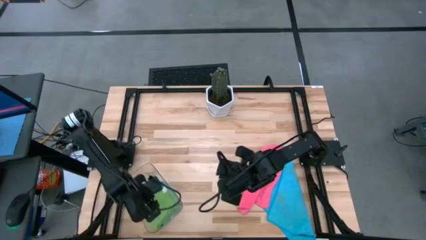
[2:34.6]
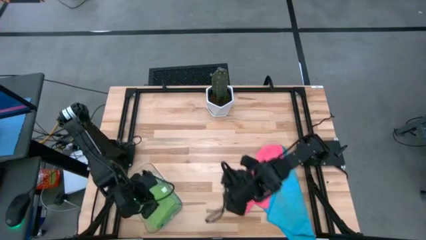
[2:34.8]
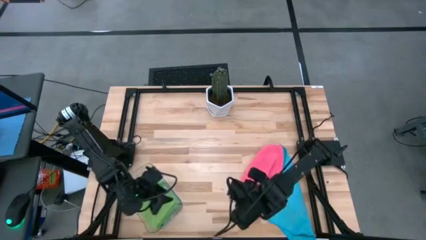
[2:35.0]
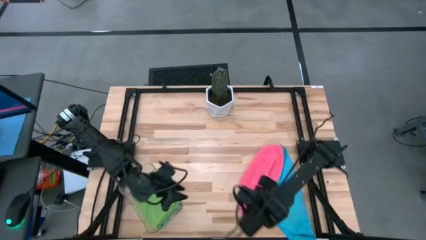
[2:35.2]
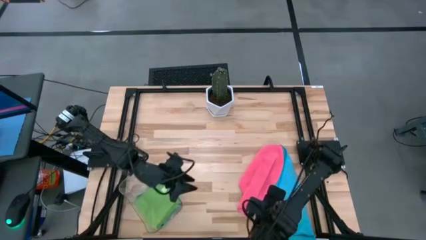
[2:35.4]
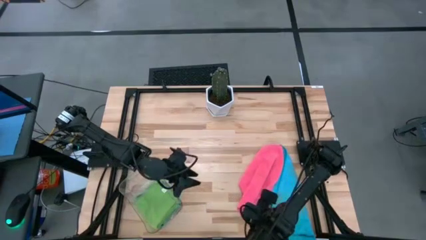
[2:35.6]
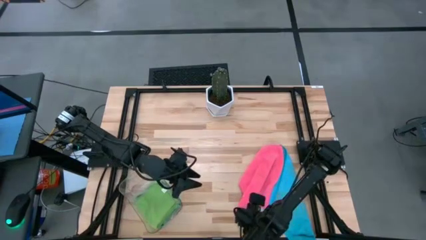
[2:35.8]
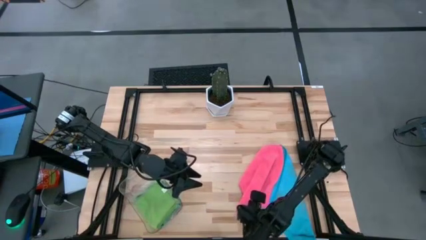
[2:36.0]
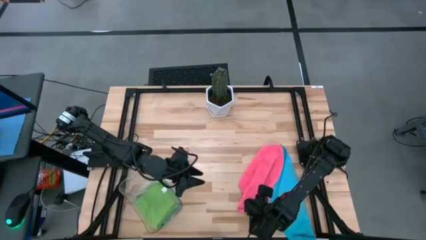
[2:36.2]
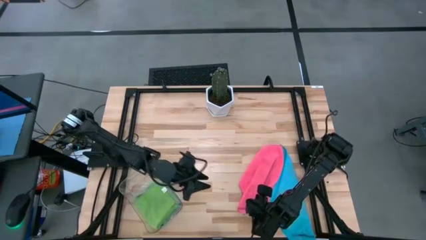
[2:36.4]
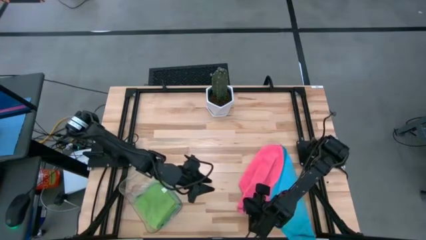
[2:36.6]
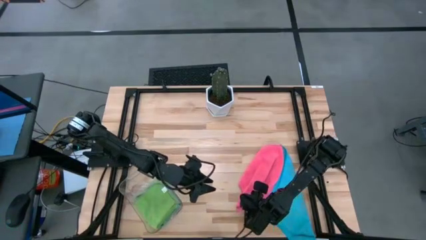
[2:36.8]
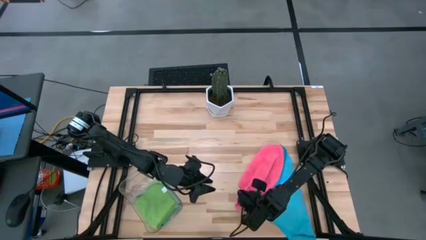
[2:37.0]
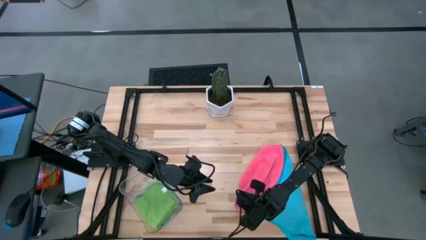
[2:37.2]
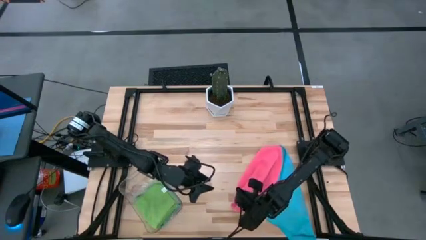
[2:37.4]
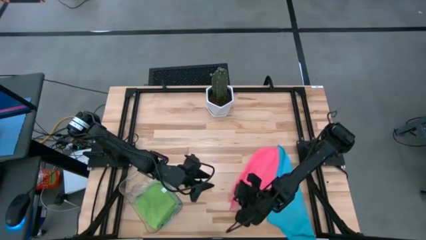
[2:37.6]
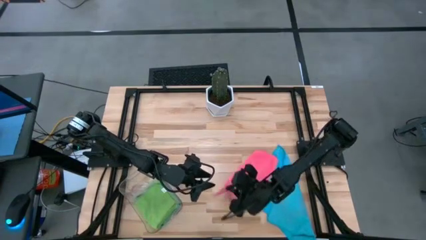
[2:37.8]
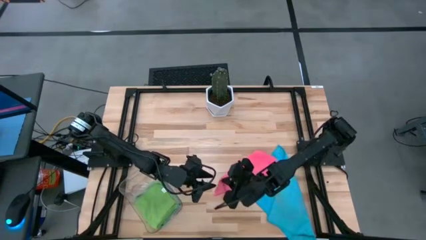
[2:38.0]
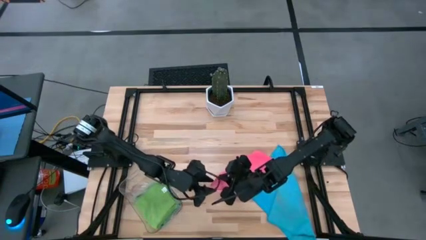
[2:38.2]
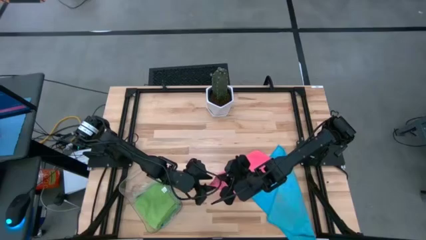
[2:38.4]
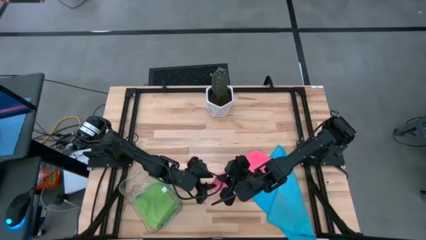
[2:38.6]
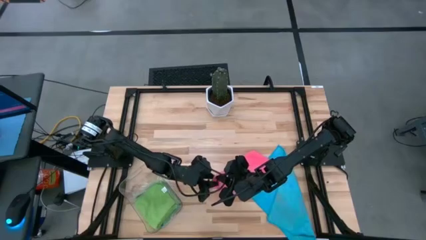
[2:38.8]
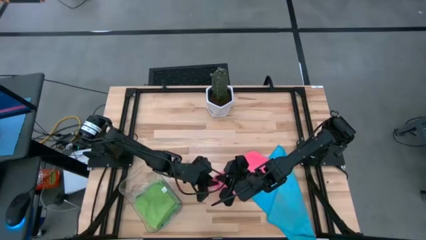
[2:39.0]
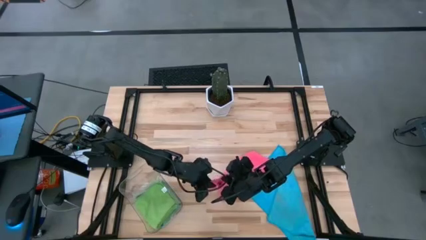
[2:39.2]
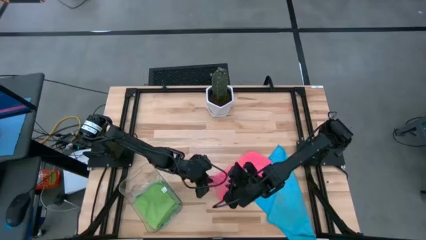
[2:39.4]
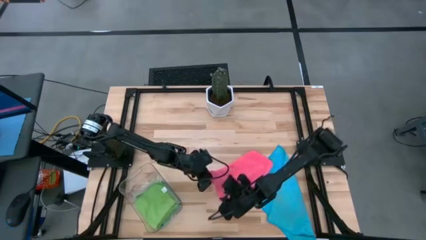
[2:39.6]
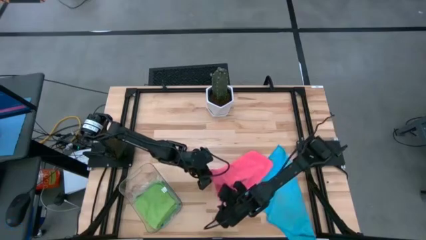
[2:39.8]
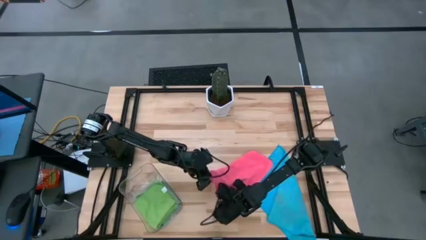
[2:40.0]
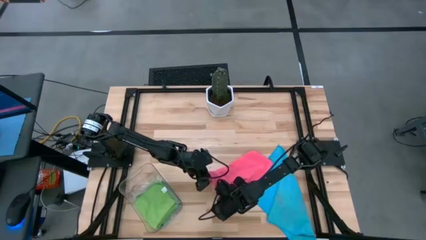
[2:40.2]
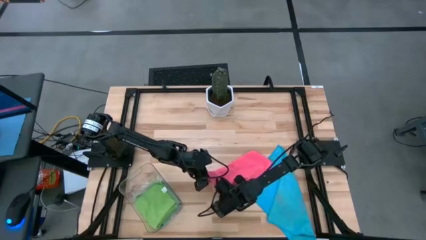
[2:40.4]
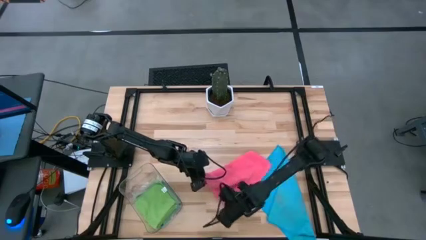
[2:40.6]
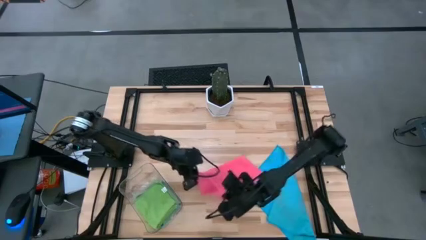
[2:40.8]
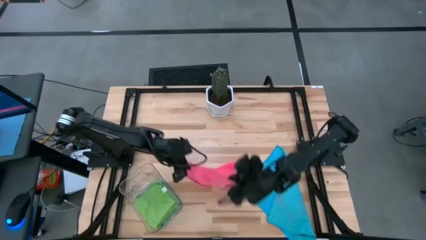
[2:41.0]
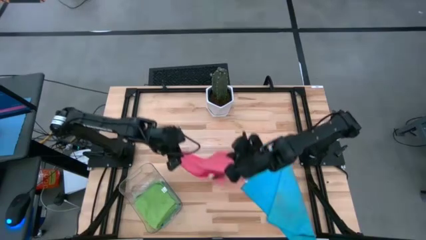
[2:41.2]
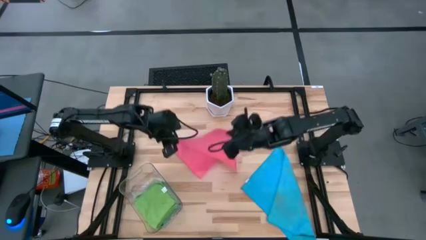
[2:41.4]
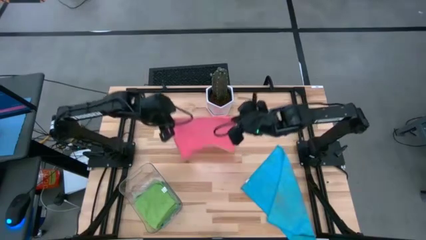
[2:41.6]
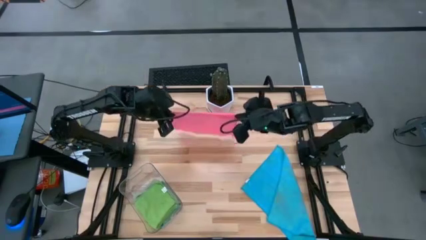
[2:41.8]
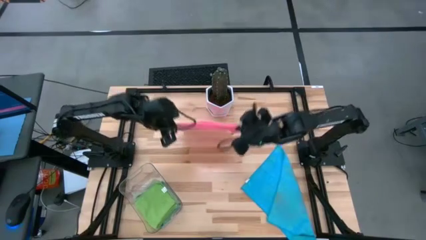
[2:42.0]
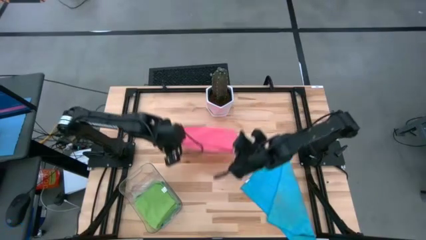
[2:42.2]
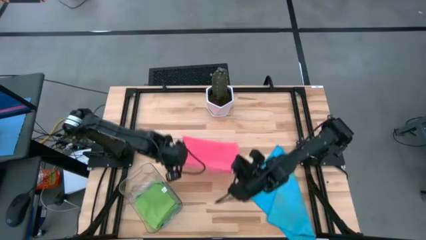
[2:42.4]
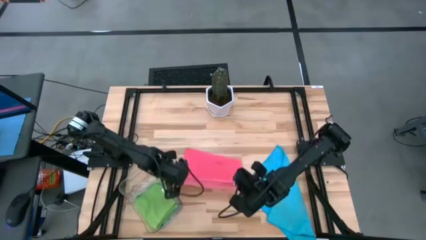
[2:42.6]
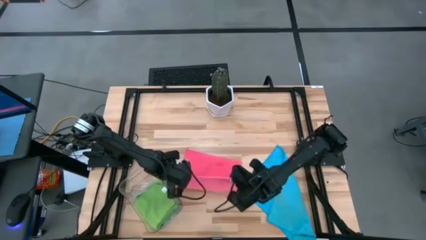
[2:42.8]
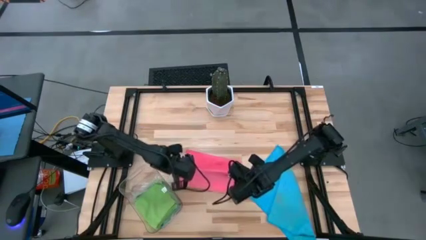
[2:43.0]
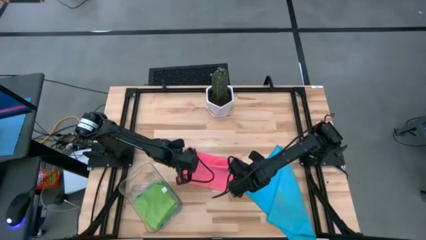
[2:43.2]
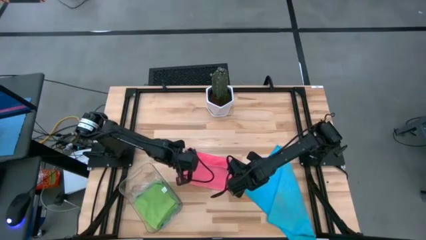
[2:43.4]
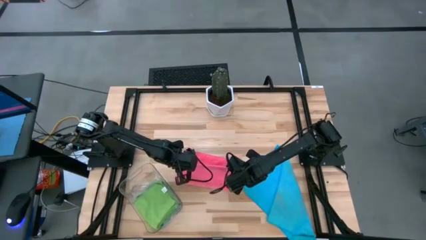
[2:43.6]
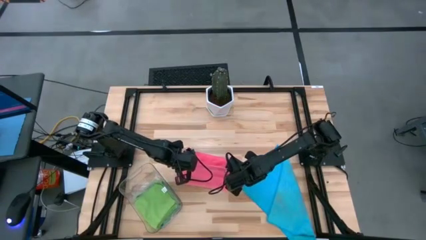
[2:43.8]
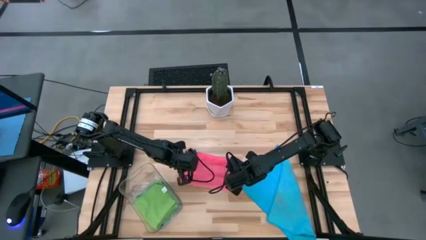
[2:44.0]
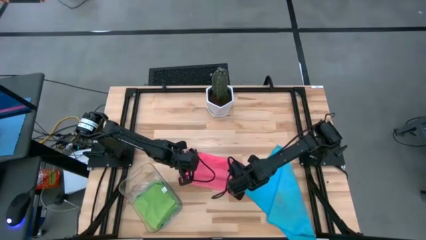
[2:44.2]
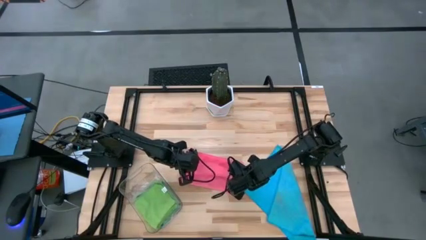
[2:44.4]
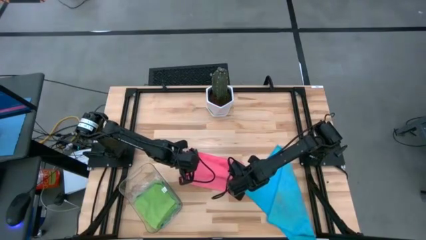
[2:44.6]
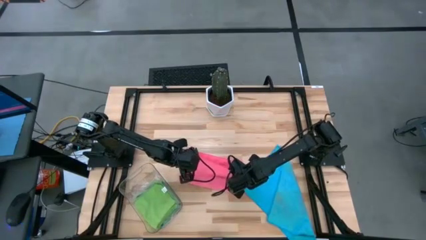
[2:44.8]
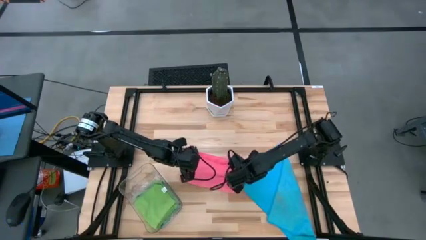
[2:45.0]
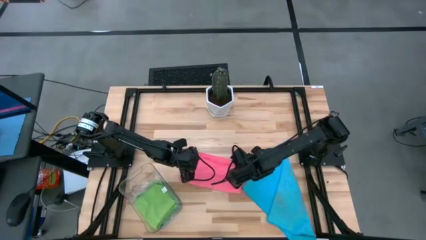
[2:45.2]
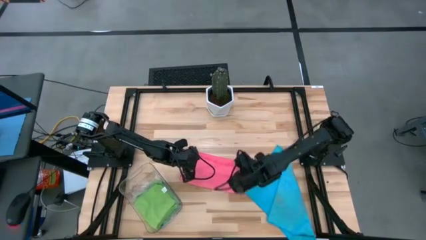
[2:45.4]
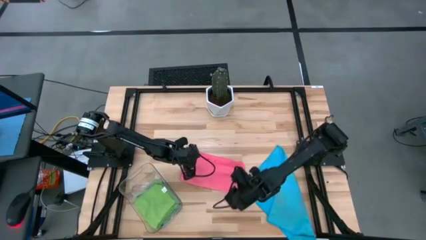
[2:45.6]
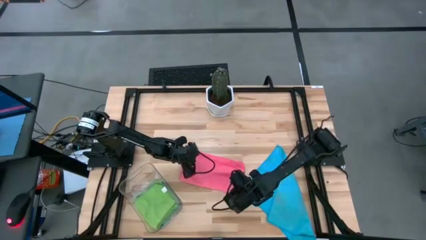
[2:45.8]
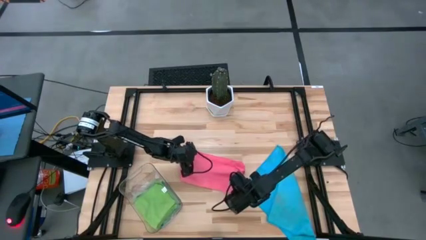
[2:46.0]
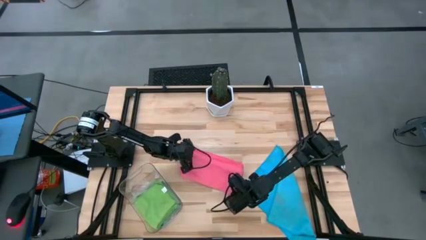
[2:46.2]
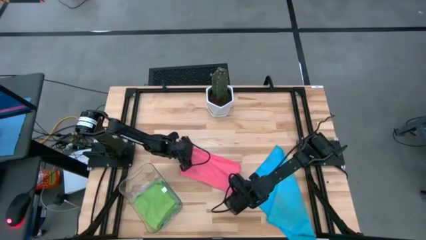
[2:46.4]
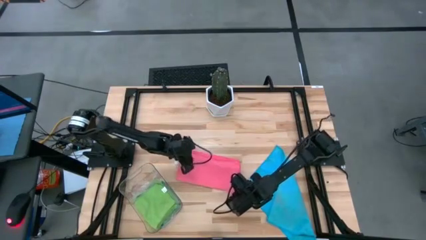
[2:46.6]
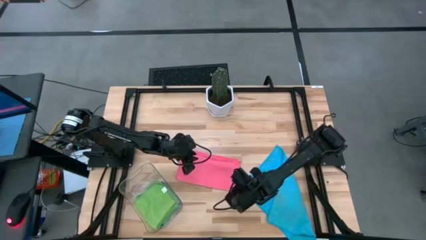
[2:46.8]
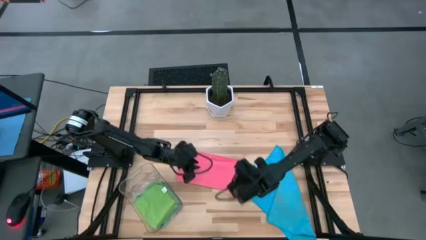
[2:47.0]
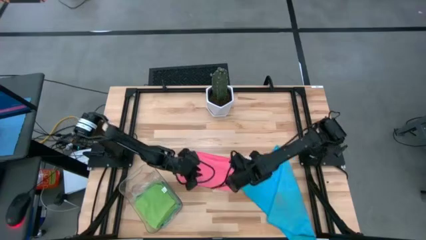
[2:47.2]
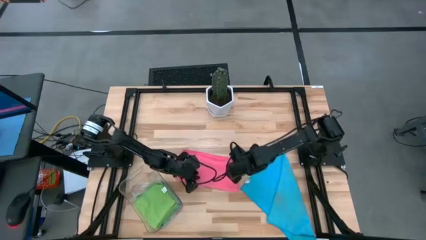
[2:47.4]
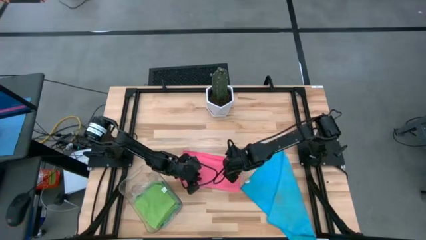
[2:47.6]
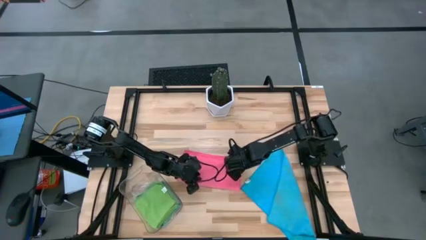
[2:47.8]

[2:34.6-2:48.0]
Task: Fold microfiber towels
Fold the pink microfiber cloth

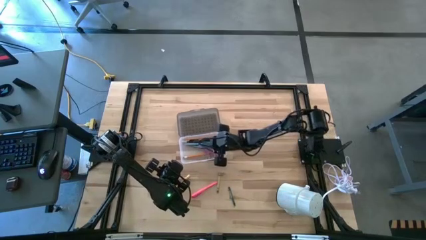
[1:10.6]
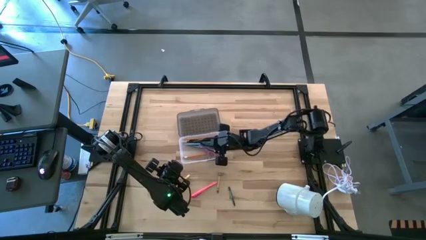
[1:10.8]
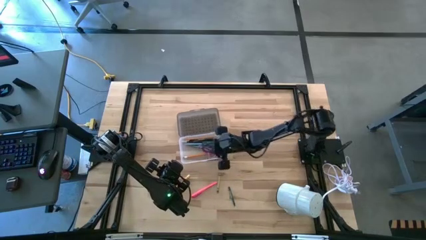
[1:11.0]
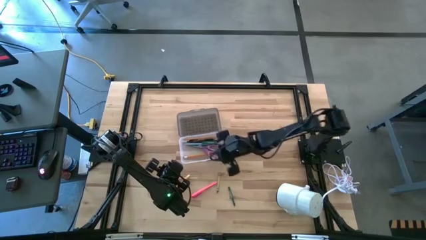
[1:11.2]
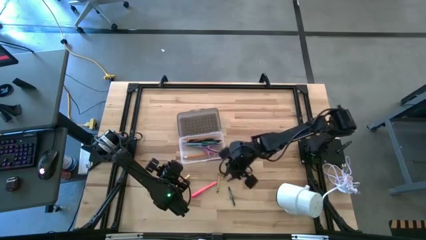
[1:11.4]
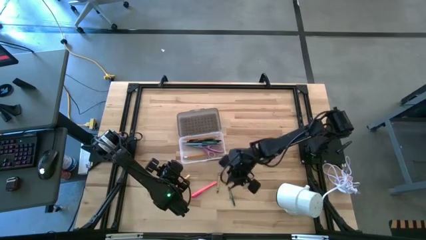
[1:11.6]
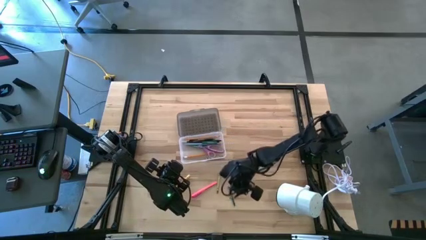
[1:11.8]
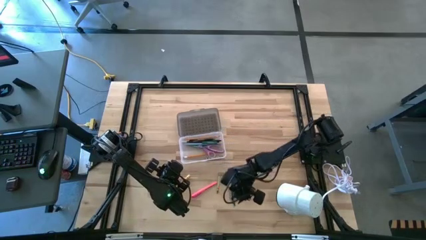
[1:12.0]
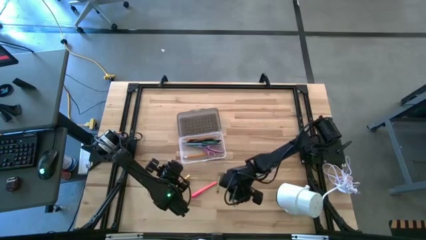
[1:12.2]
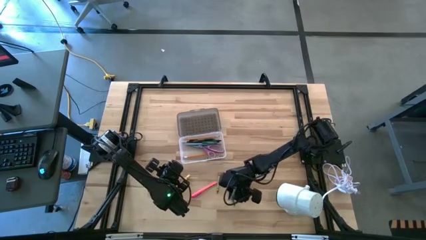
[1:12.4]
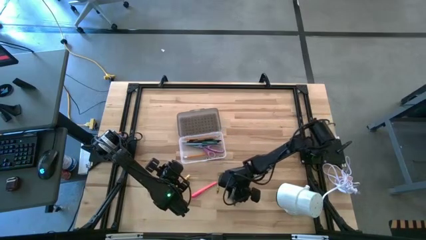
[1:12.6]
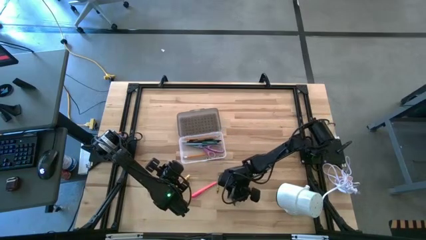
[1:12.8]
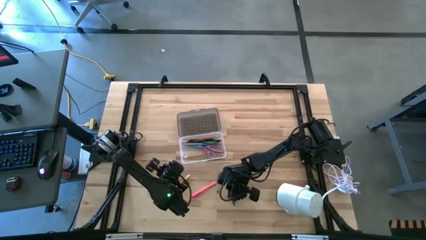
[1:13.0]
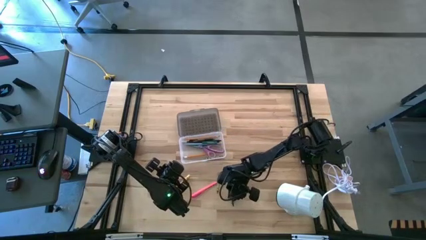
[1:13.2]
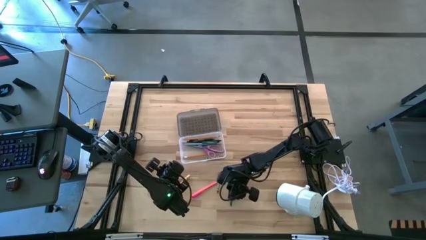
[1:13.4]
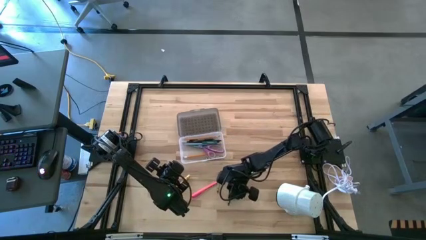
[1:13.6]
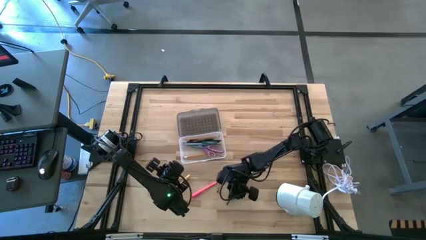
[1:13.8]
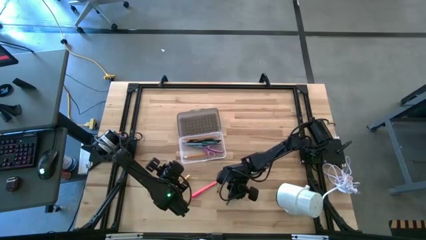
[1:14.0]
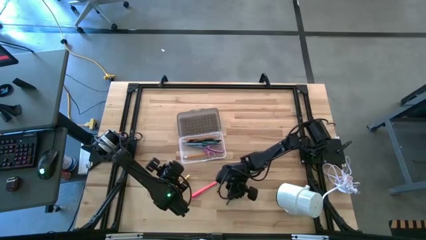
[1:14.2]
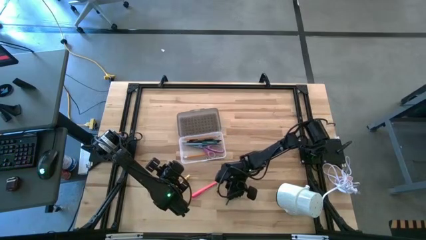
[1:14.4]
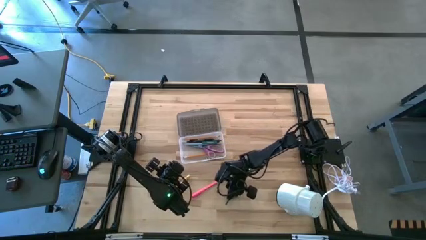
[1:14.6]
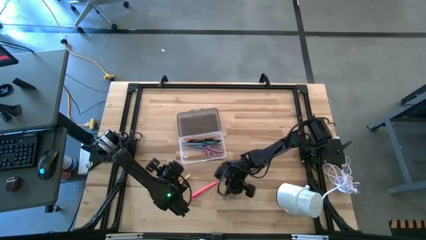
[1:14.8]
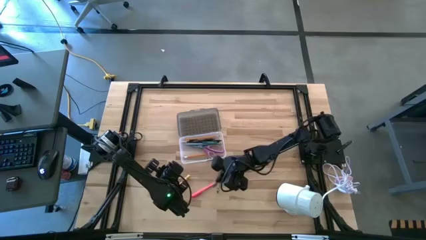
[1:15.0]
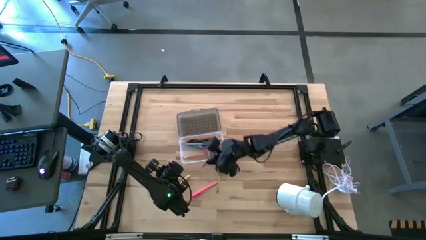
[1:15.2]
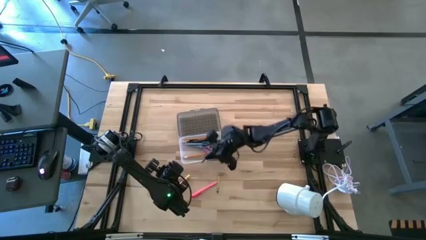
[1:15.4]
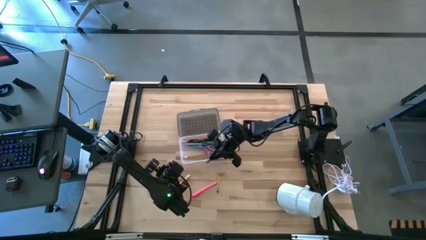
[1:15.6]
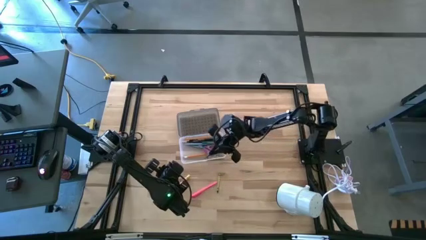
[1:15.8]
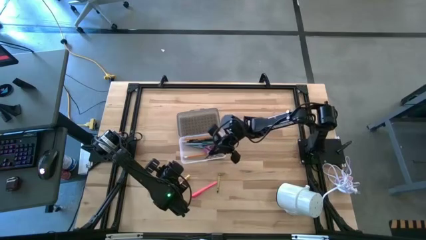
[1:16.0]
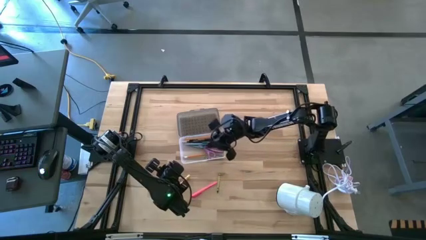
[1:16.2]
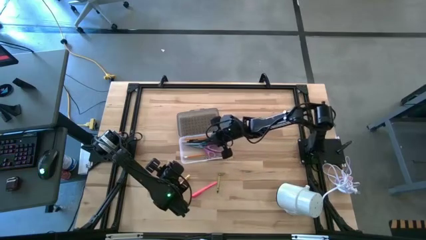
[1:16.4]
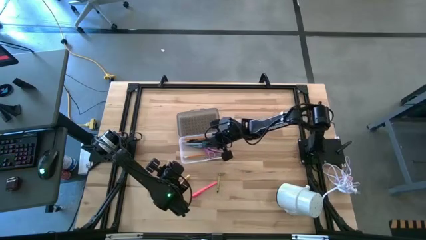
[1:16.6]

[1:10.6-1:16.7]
Task: Pick & place school supplies into a supply box
Put the dark green crayon into the gray supply box
